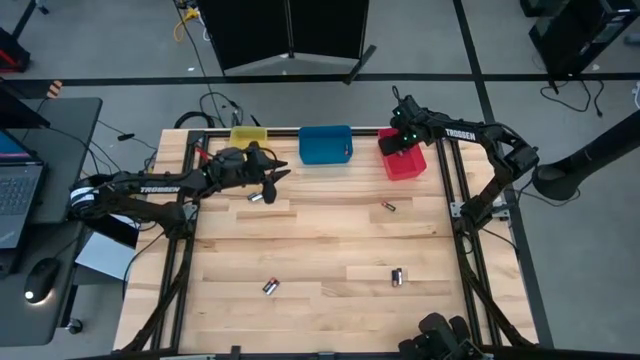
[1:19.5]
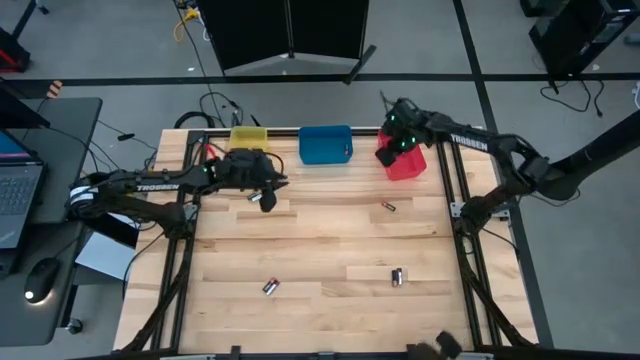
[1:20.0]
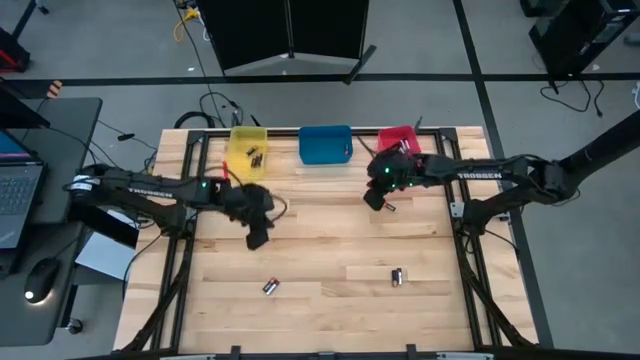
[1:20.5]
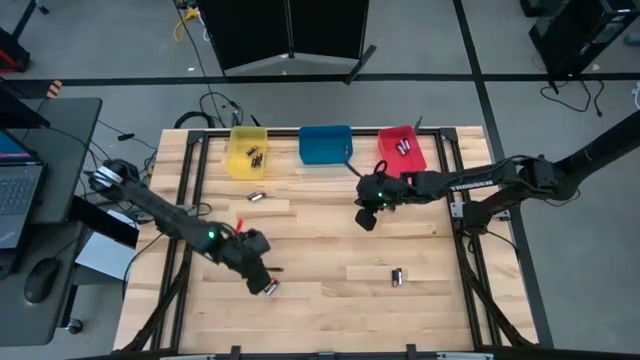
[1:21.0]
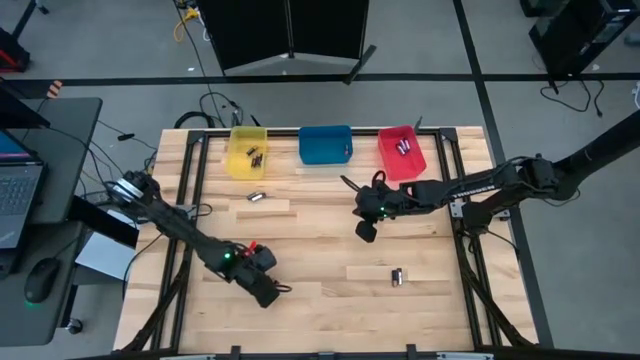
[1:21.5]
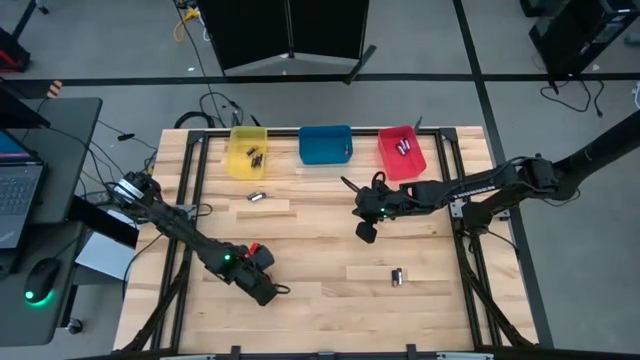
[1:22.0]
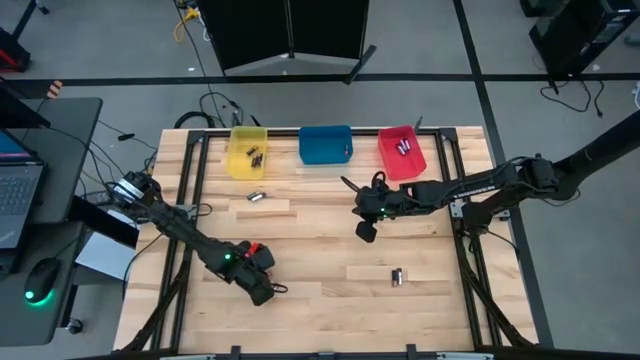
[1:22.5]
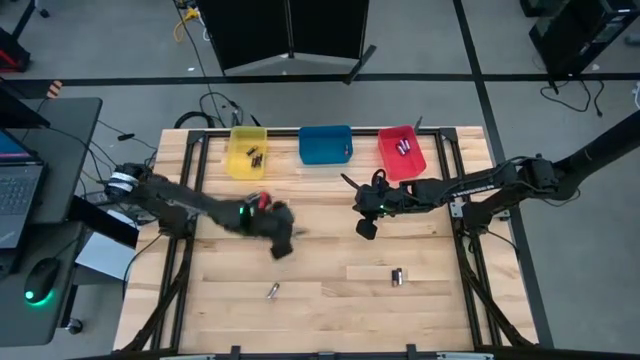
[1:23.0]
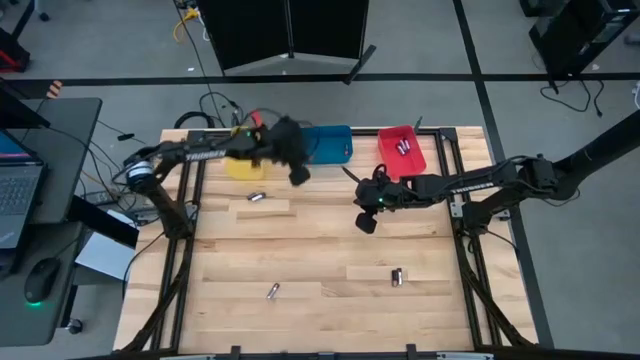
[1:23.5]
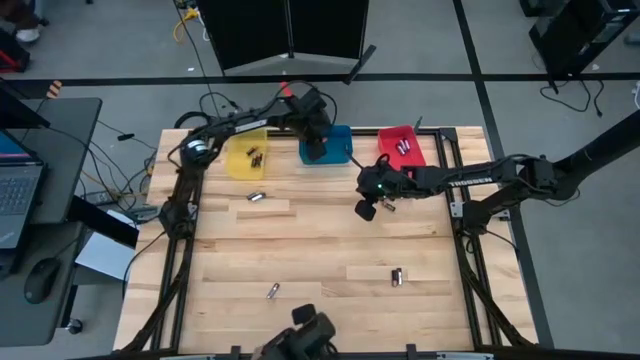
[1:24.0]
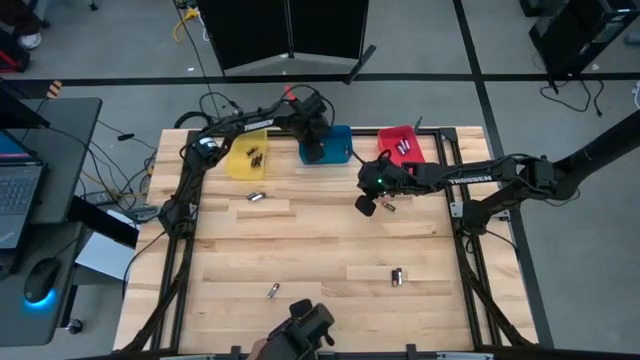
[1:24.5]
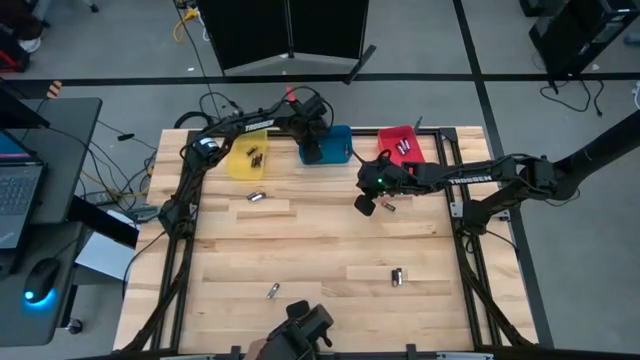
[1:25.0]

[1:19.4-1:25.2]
Task: Sort batteries
Put the black orange battery into the blue bin

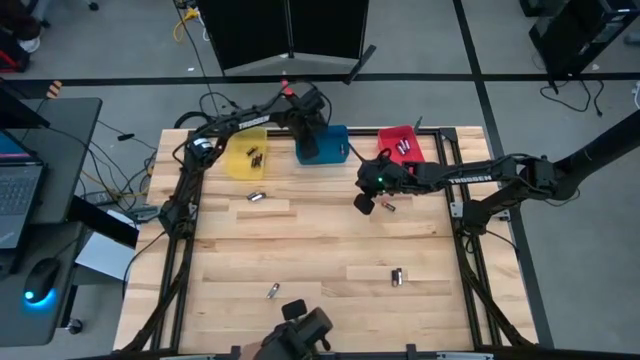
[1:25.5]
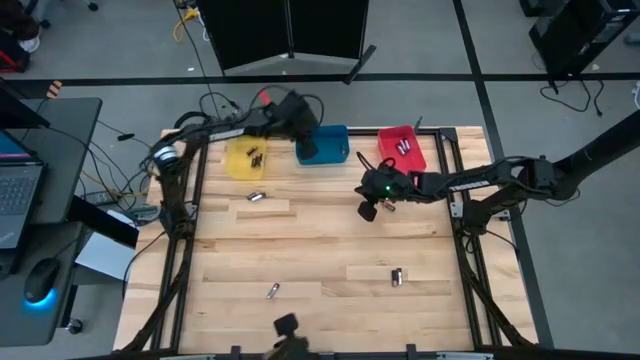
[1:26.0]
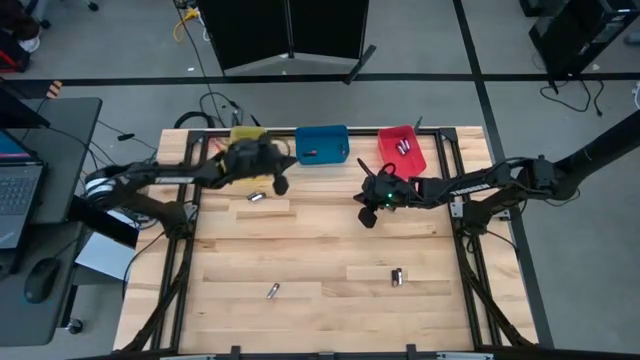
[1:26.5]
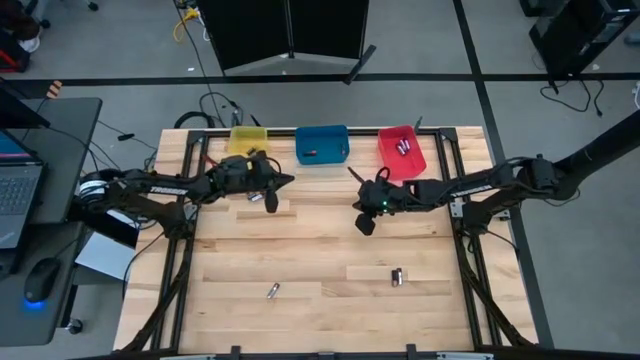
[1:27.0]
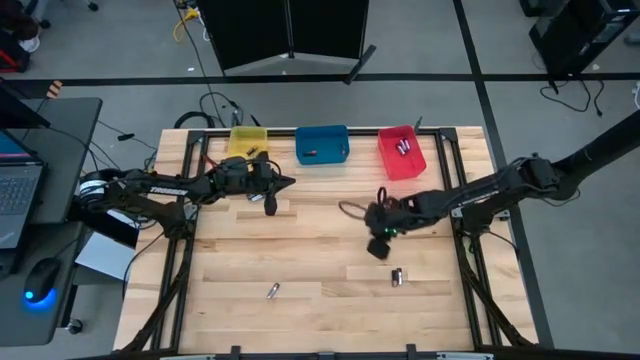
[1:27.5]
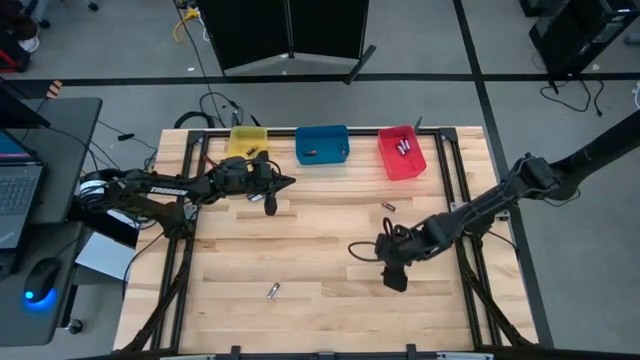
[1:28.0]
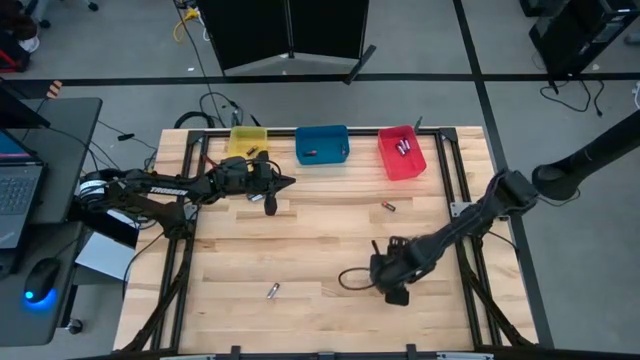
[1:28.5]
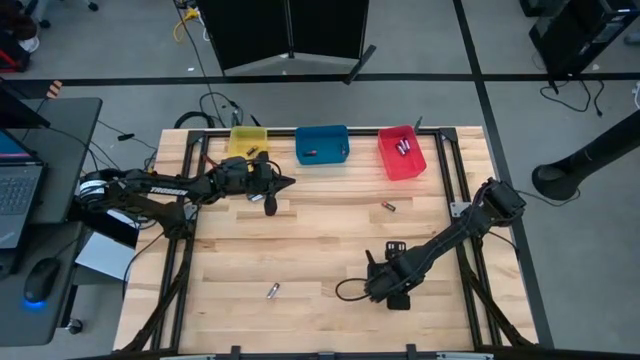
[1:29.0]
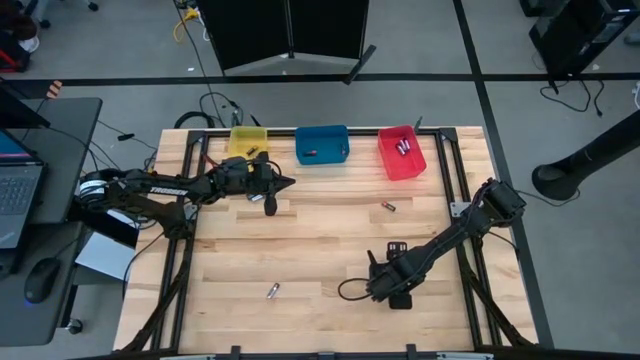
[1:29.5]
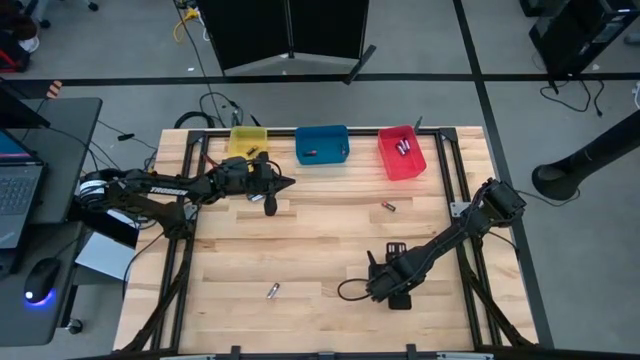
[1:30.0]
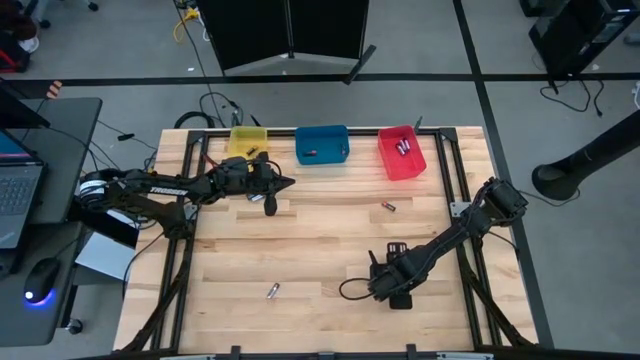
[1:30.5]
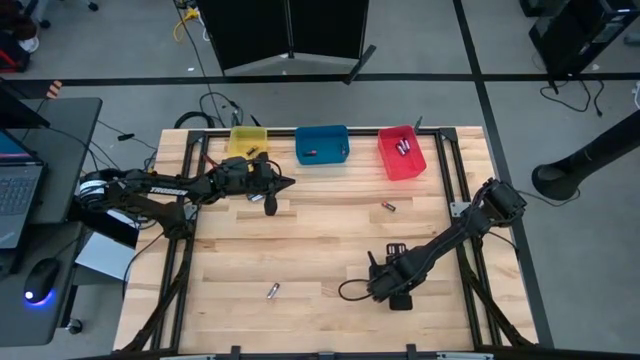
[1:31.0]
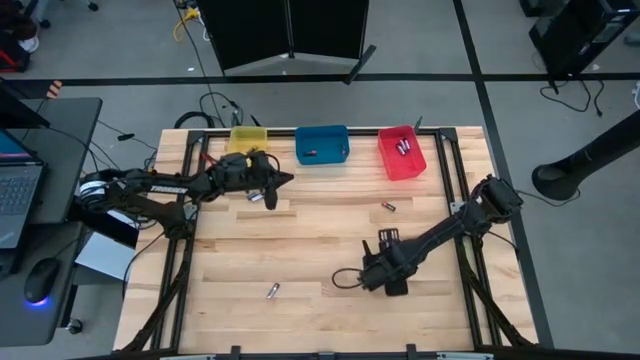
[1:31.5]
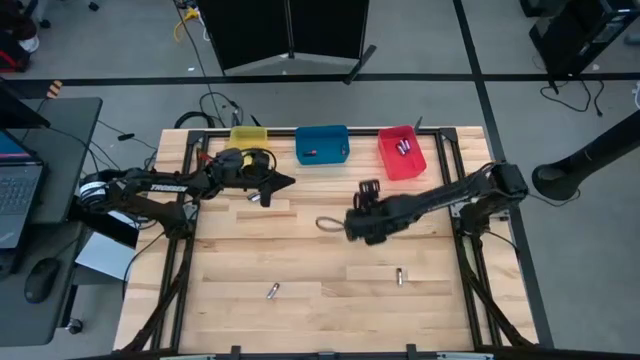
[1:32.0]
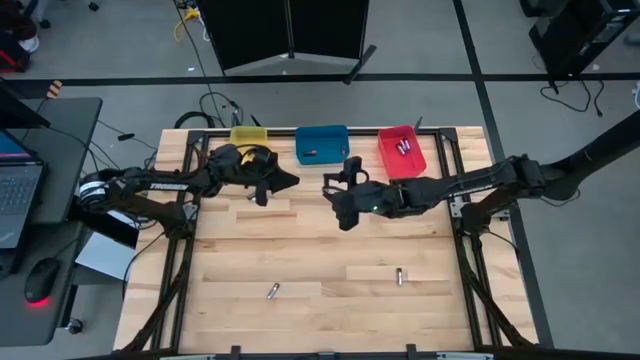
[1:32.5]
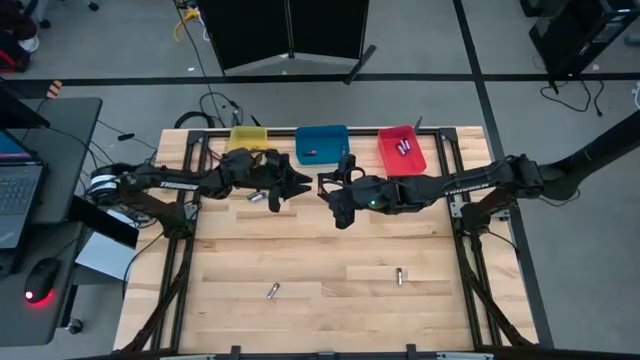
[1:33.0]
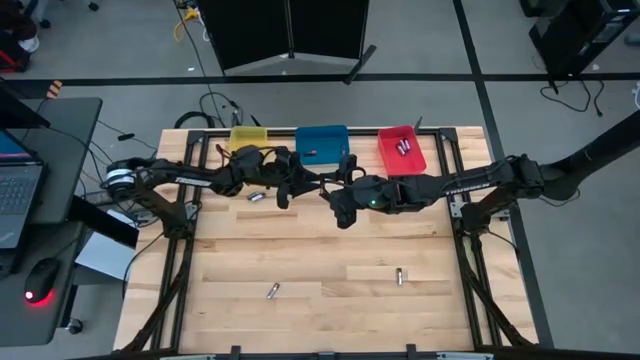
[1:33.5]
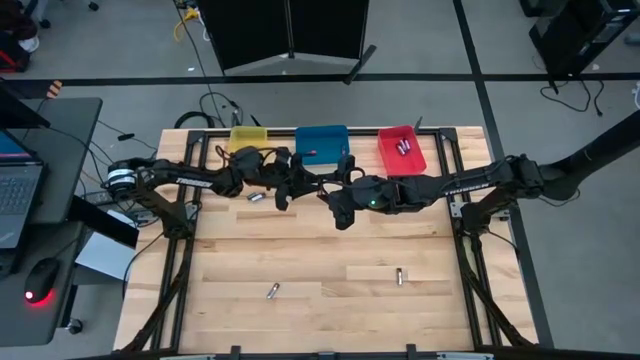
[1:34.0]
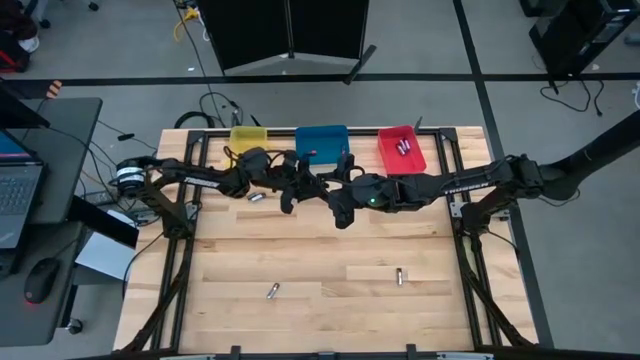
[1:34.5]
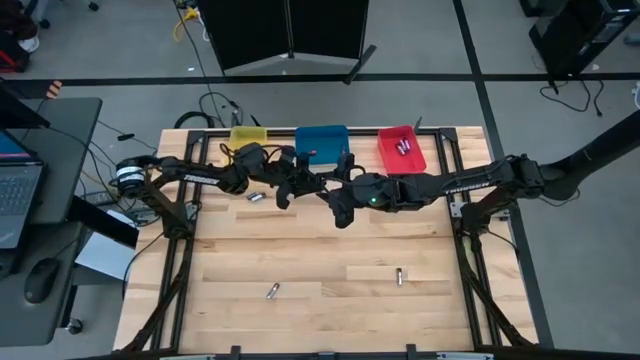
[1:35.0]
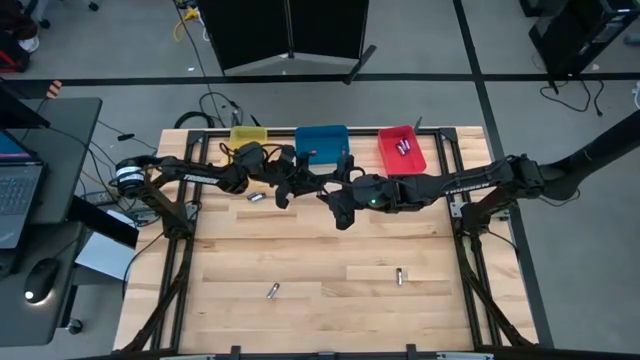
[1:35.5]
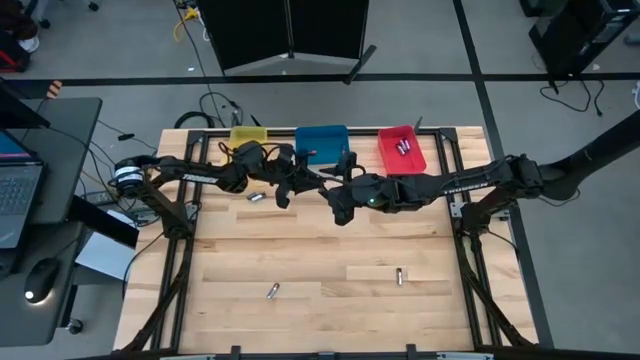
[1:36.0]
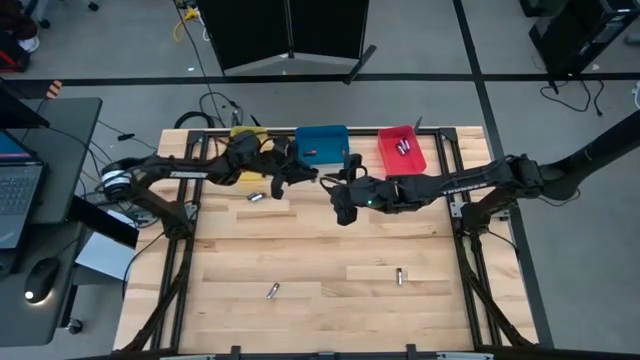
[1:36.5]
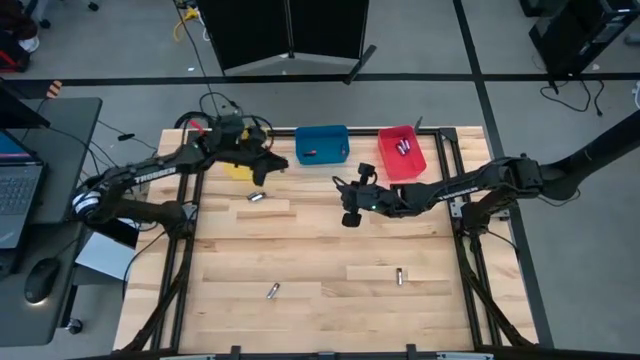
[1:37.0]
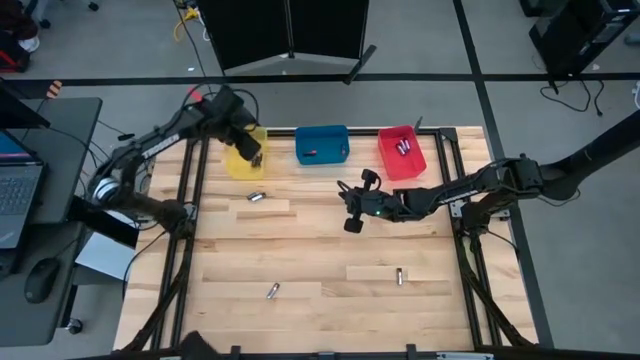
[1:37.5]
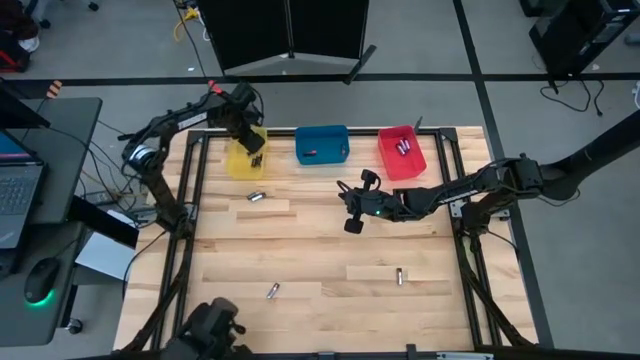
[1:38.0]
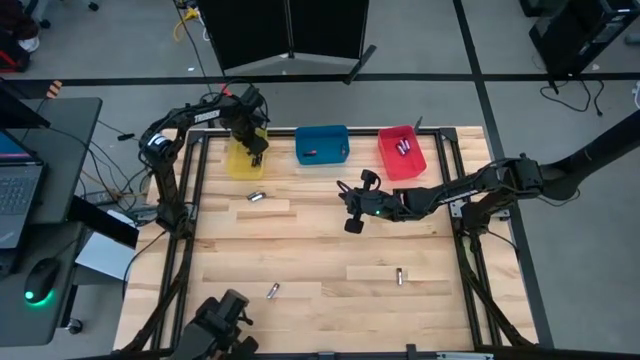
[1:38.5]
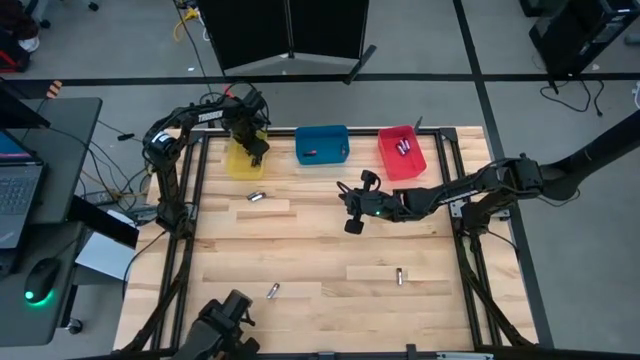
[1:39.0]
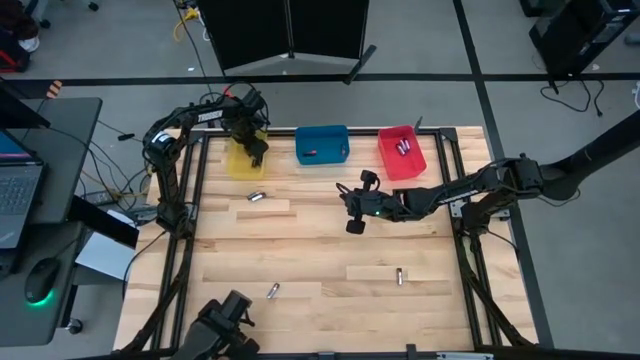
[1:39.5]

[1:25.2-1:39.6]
Put the black battery into the yellow bin
